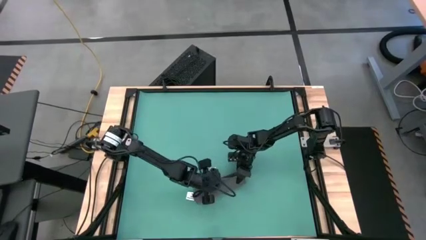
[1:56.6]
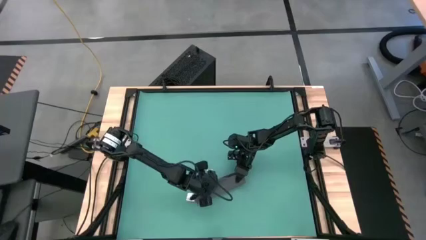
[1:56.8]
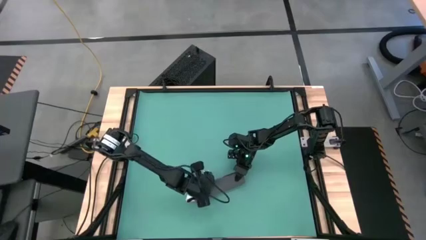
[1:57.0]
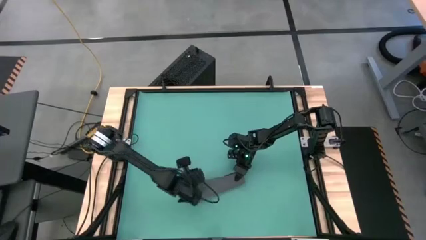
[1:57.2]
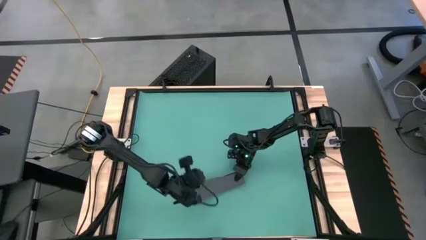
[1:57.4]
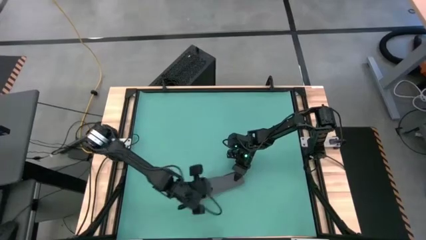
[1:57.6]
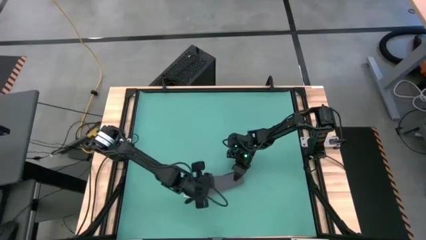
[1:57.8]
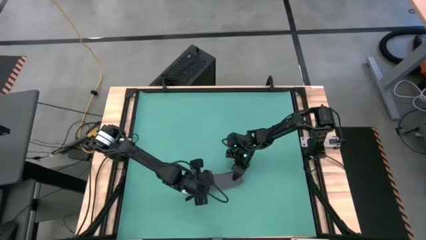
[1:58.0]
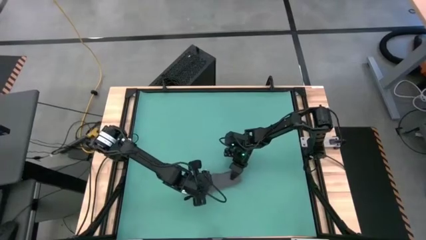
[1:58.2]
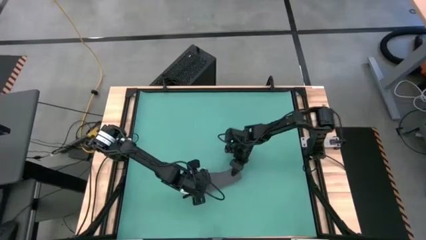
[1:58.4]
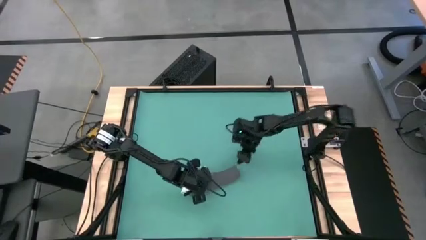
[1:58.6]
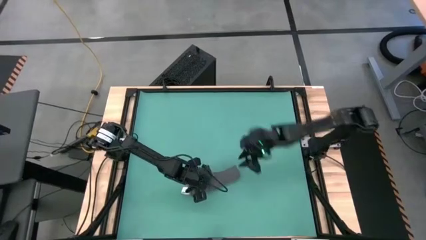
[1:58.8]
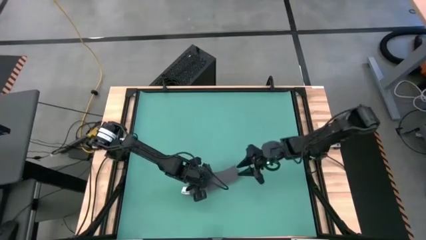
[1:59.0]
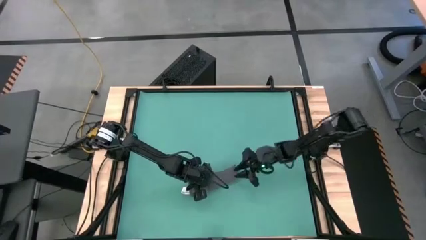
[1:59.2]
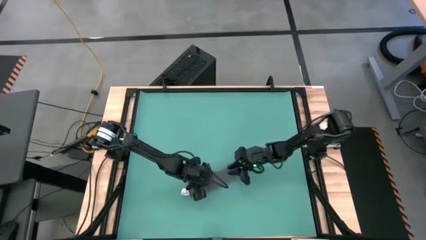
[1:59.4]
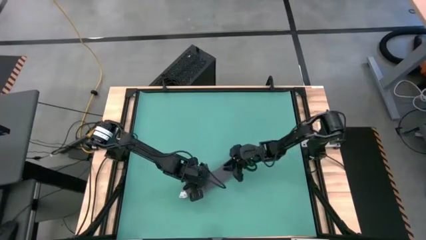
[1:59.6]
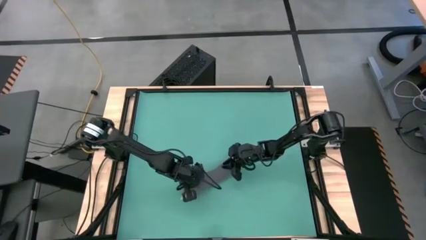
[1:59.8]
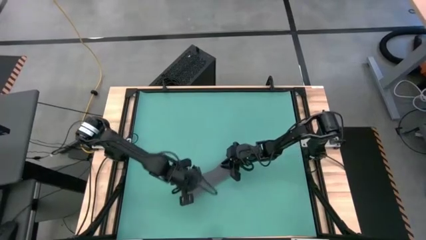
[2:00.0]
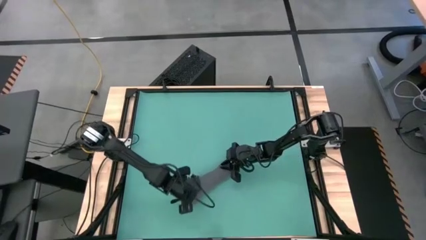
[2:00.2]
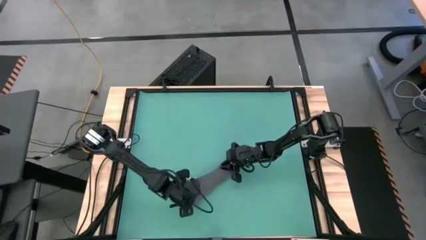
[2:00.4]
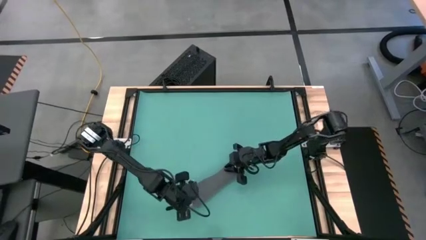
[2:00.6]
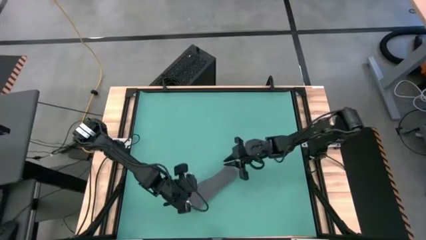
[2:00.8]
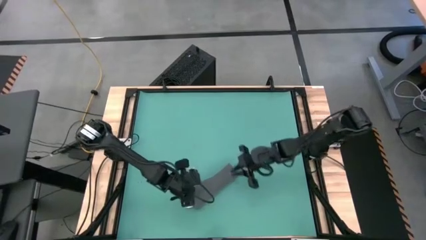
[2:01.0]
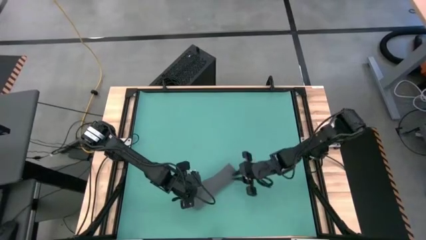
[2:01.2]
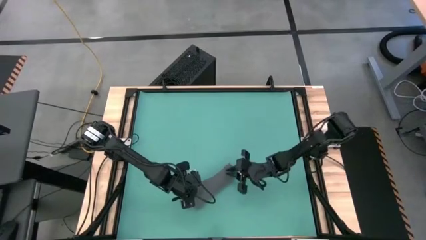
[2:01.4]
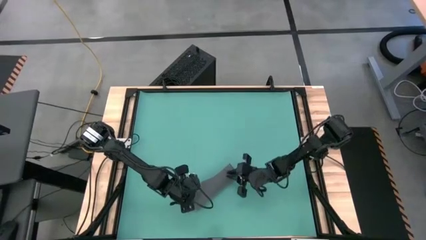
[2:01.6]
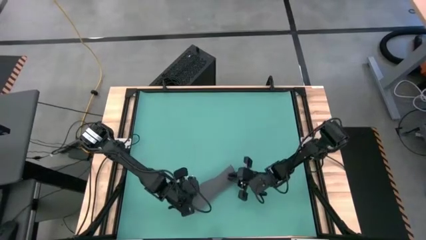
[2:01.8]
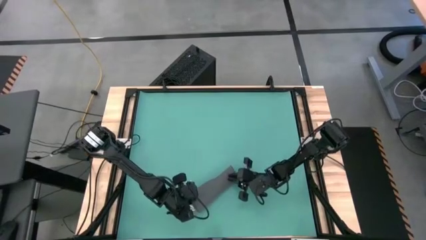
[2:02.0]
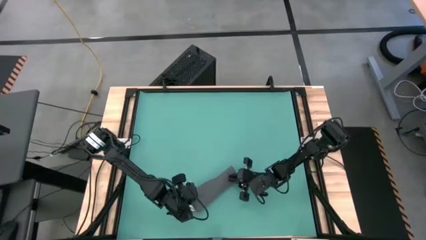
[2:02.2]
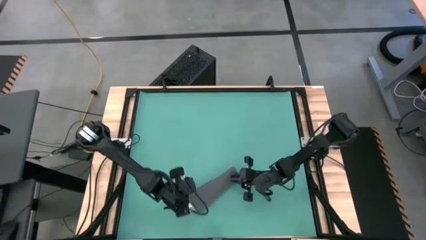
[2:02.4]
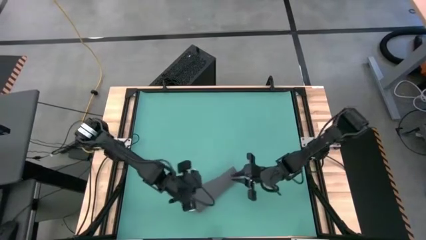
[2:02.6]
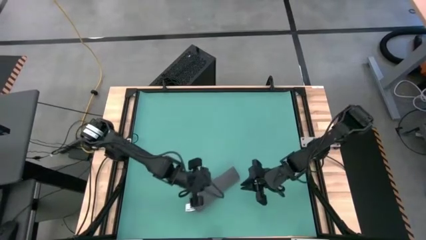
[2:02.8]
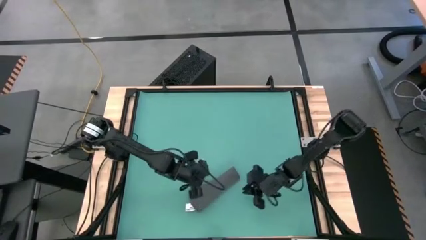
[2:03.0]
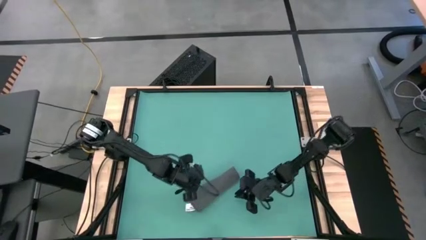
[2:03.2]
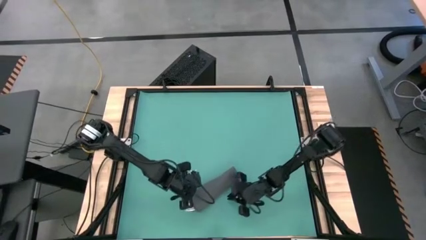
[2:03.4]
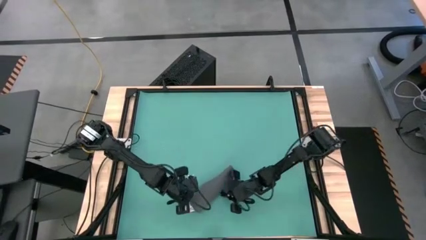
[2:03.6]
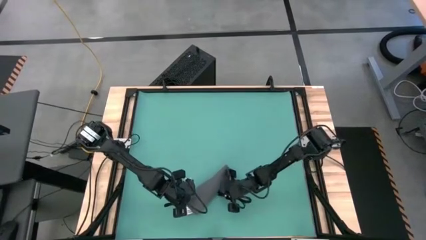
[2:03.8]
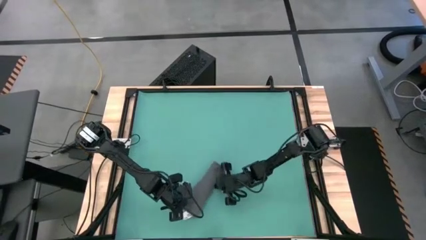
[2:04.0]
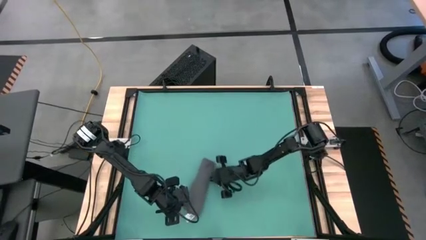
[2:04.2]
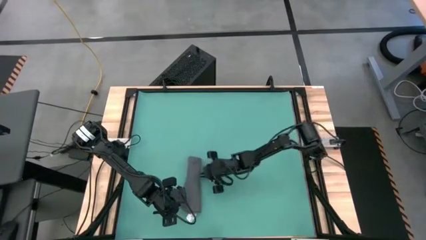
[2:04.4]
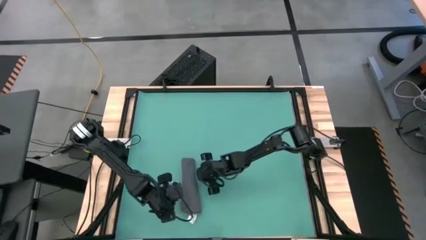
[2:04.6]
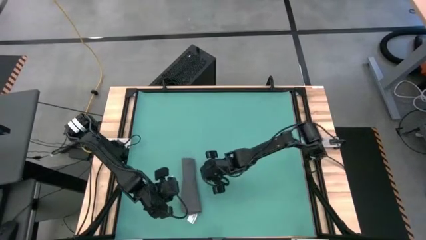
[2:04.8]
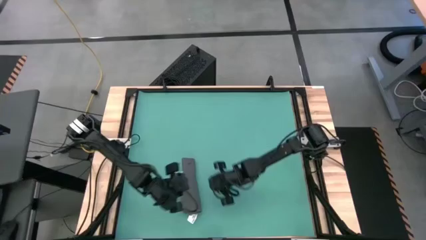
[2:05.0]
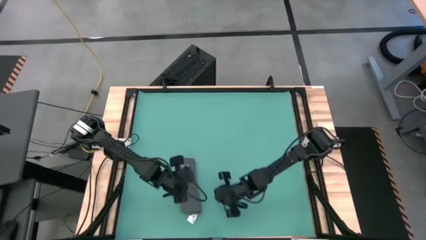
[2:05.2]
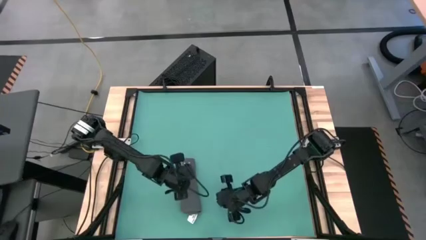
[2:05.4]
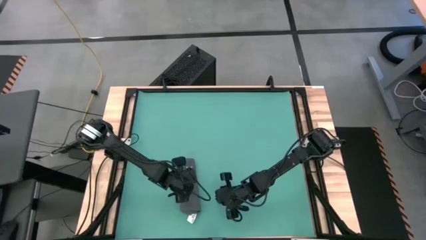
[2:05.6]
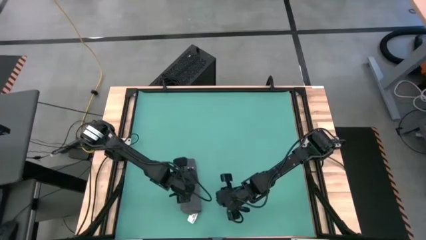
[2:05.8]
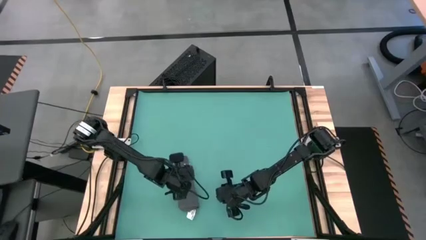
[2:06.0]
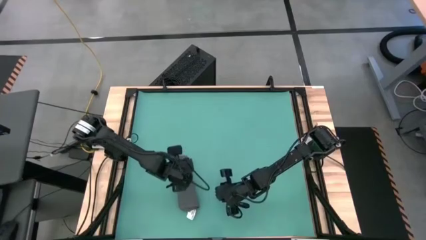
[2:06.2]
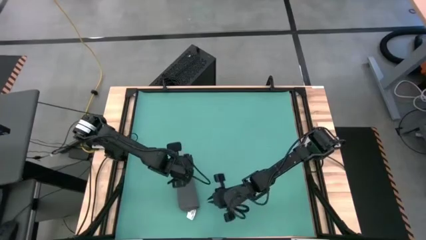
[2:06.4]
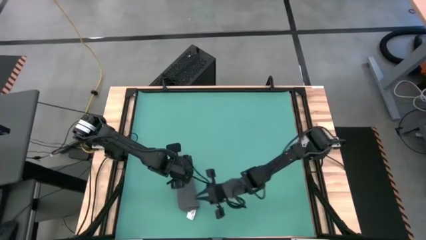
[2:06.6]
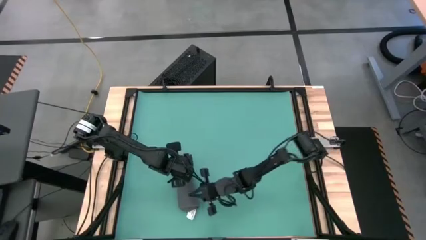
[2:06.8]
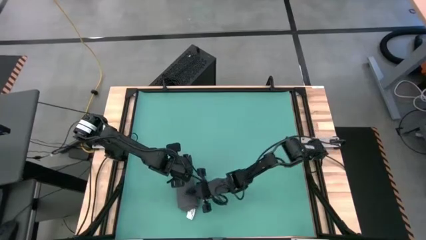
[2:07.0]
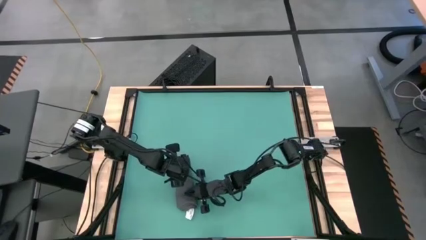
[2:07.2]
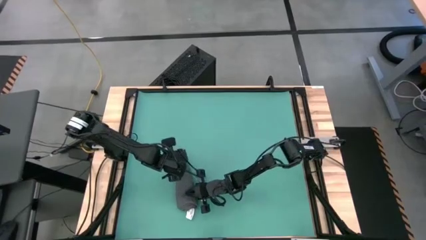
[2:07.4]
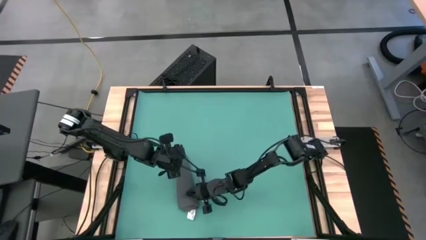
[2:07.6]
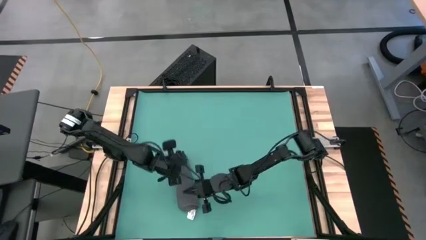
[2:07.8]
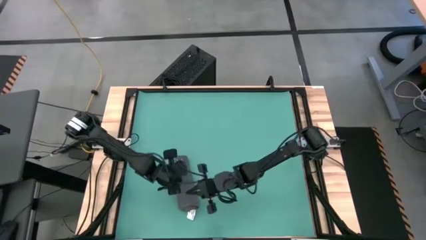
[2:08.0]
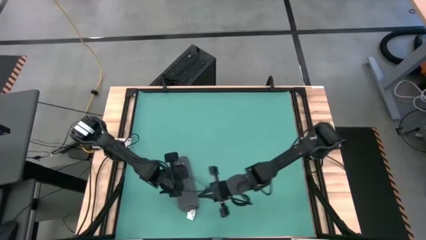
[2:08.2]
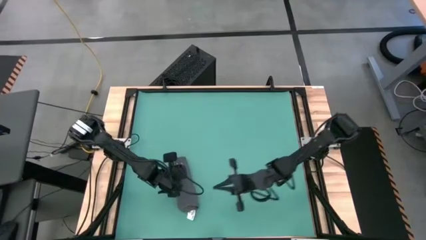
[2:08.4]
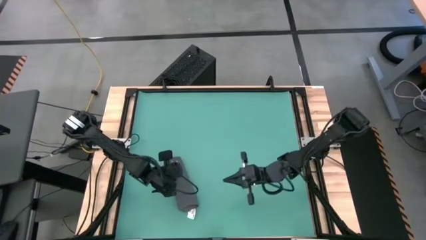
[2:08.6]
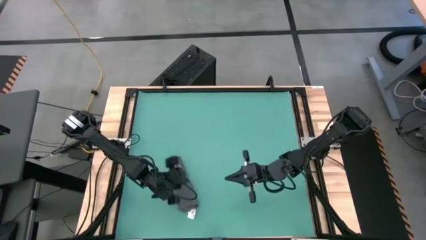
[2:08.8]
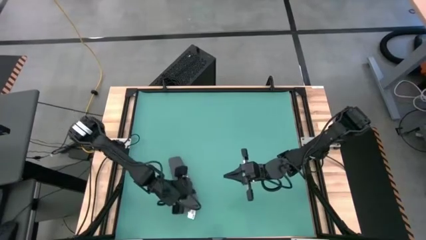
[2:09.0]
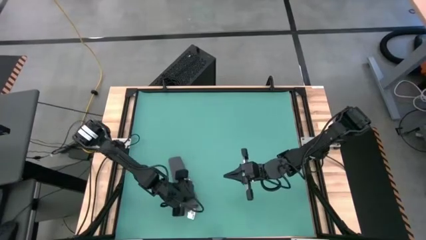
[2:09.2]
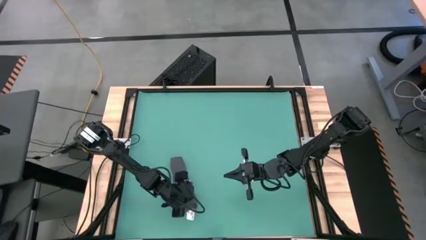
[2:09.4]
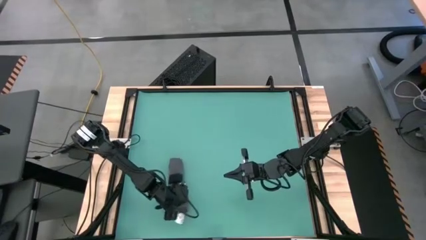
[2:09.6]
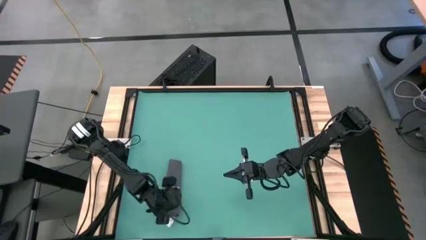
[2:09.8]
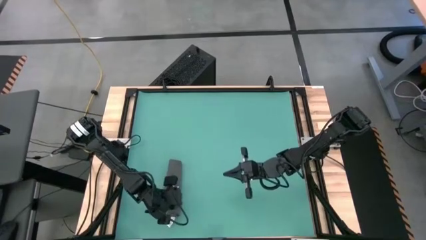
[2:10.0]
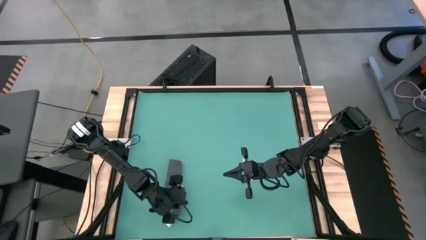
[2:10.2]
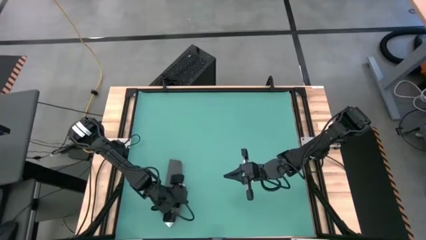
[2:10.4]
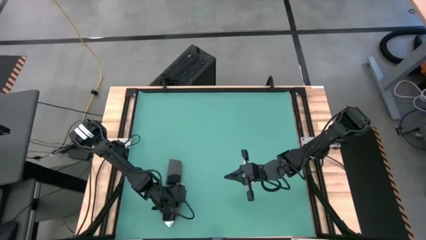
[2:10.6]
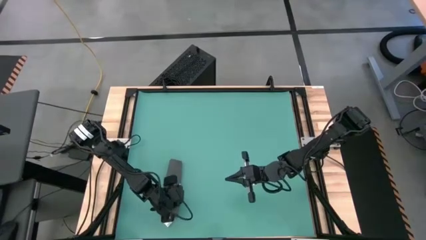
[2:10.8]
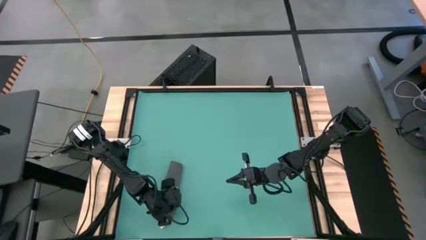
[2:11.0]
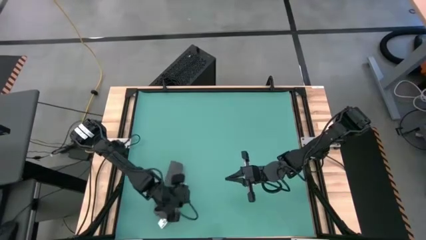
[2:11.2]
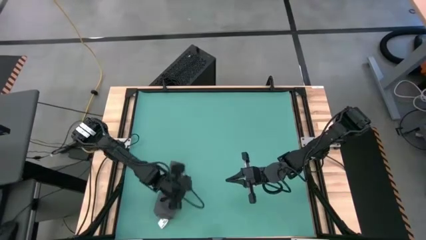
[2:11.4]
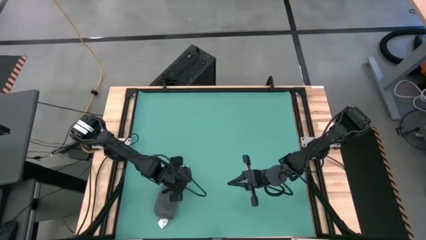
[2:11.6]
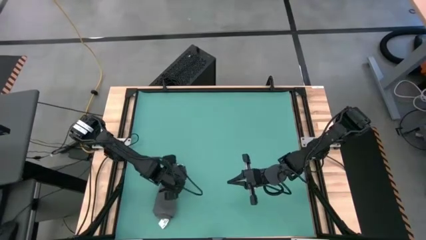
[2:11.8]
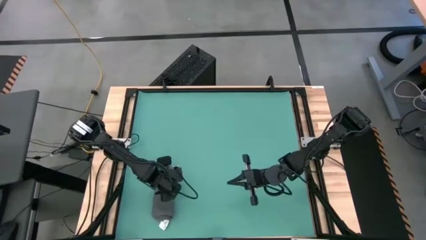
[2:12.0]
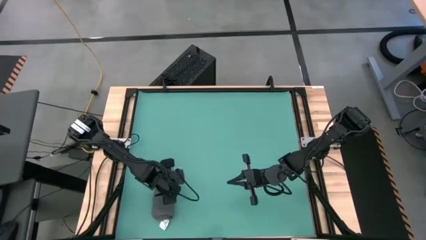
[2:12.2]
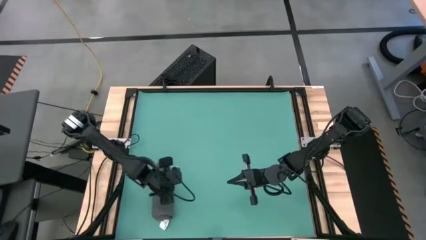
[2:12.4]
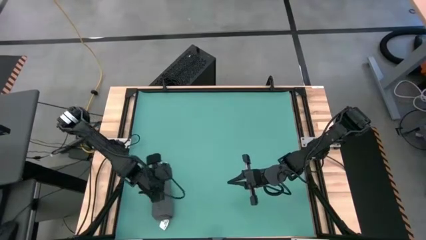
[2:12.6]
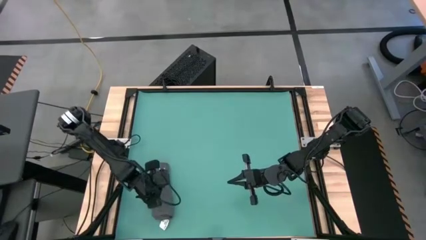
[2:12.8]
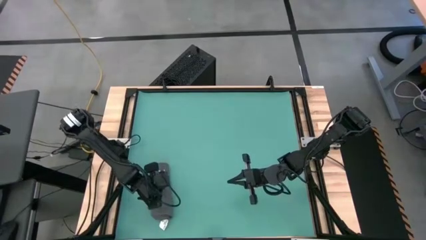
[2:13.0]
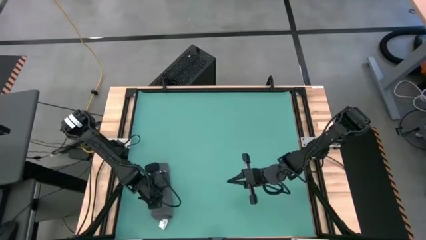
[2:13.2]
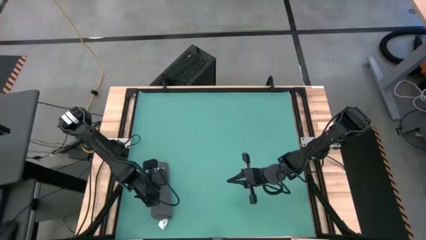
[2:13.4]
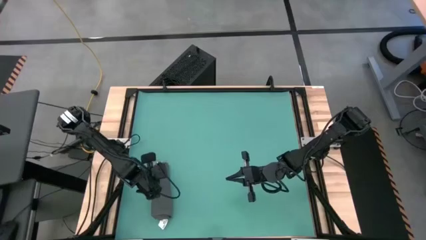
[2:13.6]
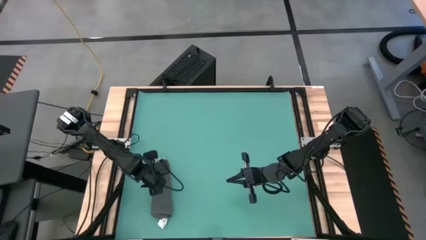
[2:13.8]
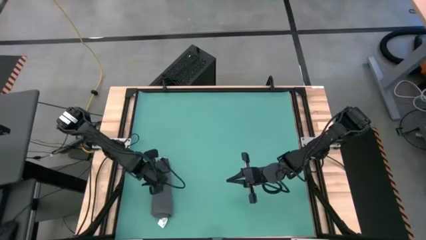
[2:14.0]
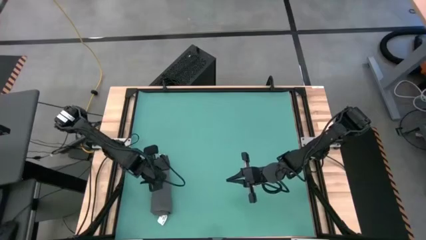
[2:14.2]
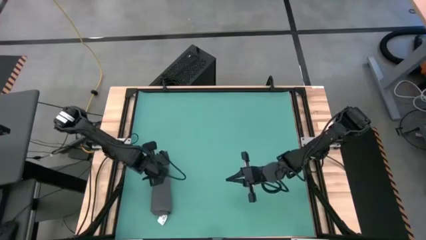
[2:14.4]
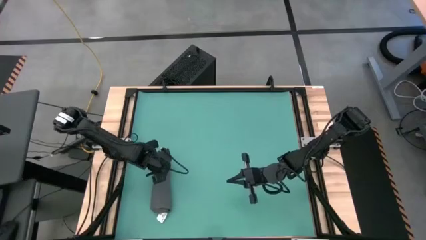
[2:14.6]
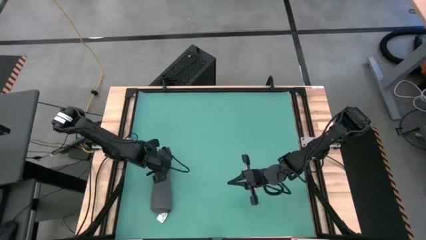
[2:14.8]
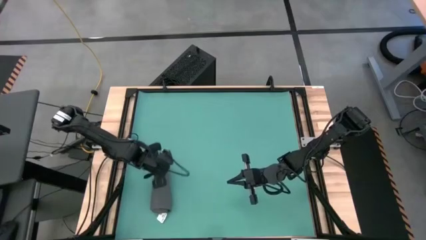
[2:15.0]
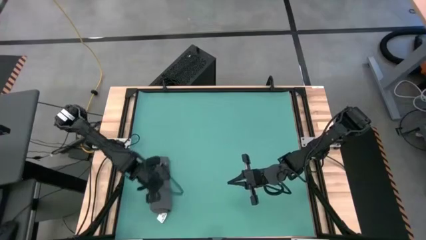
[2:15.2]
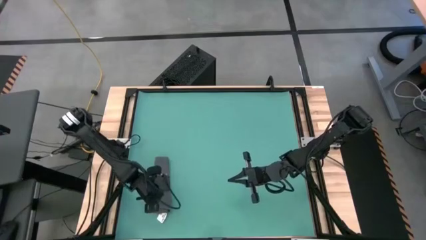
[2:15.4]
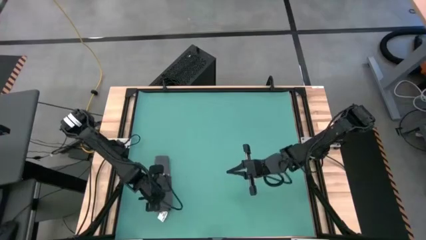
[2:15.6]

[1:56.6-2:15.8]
Task: Roll towel
Roll the gray towel
